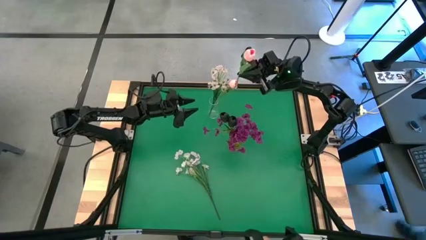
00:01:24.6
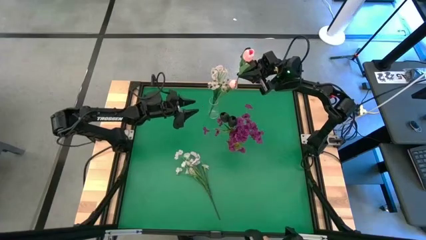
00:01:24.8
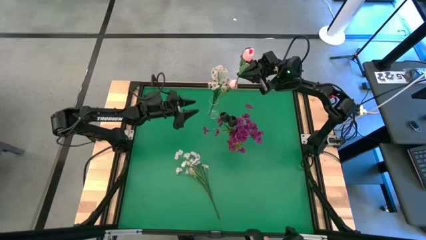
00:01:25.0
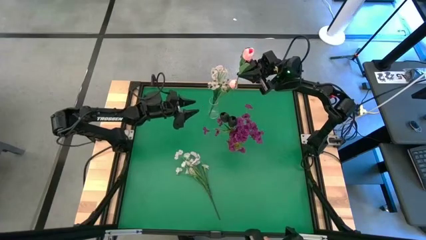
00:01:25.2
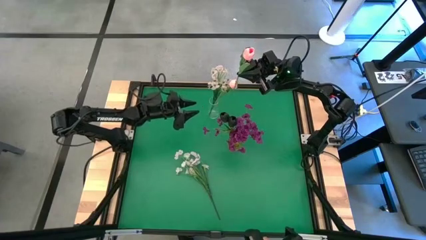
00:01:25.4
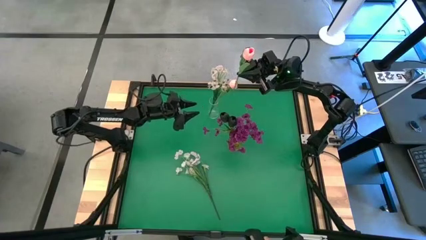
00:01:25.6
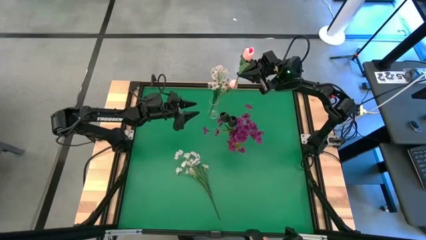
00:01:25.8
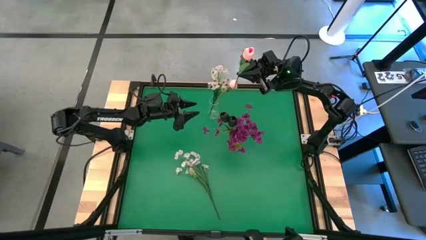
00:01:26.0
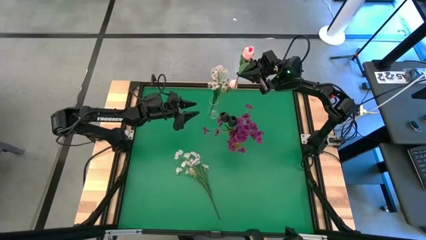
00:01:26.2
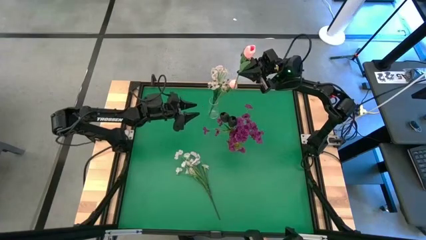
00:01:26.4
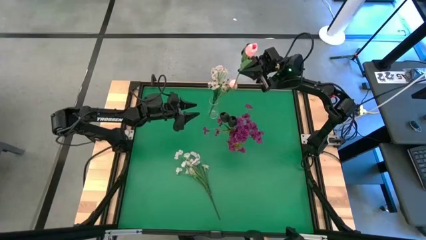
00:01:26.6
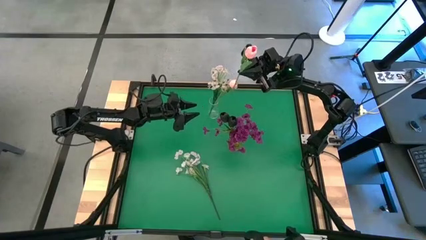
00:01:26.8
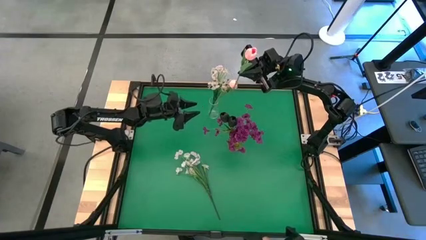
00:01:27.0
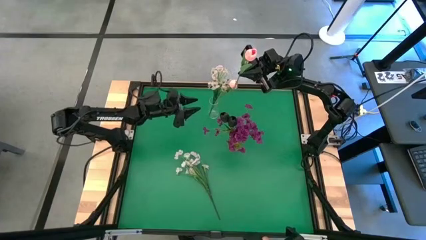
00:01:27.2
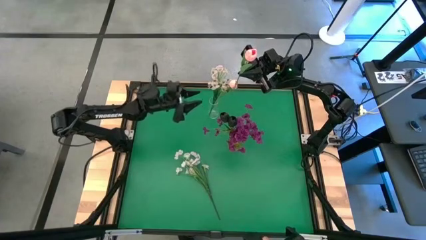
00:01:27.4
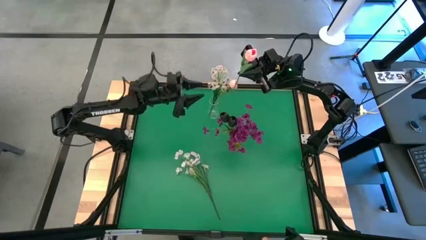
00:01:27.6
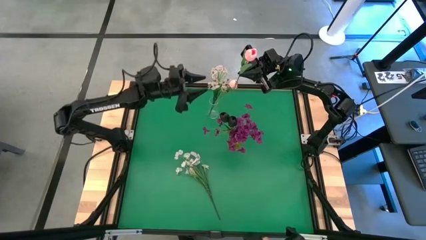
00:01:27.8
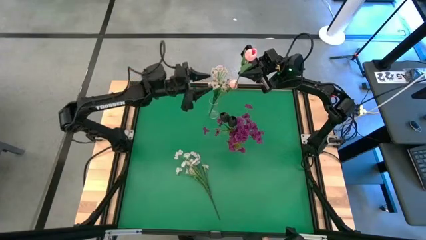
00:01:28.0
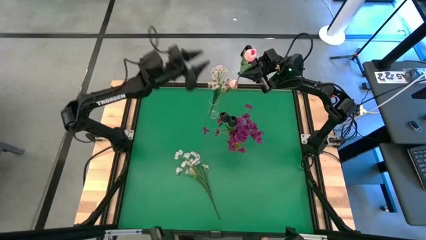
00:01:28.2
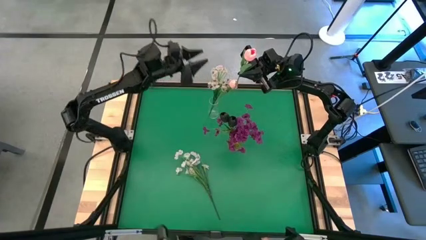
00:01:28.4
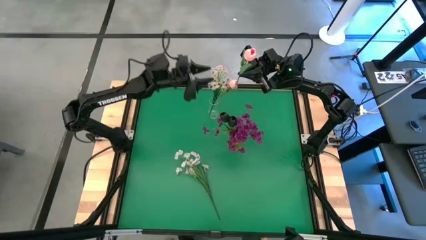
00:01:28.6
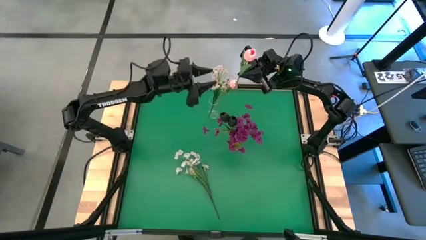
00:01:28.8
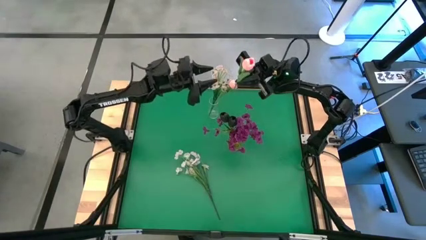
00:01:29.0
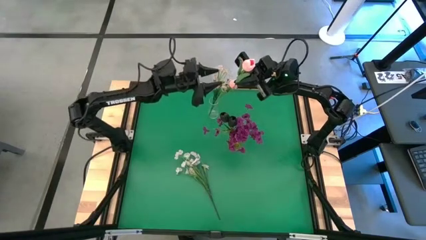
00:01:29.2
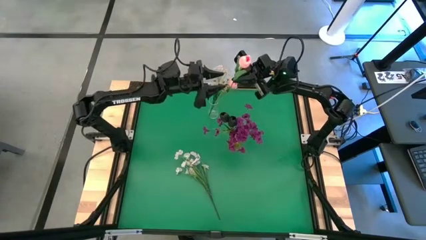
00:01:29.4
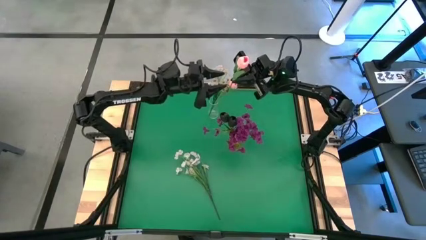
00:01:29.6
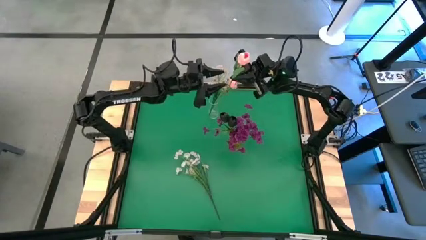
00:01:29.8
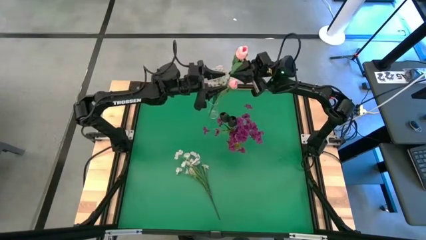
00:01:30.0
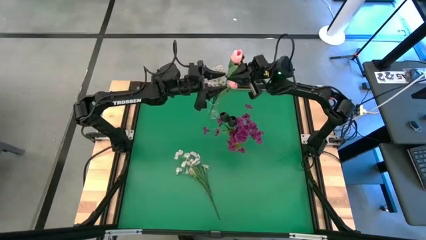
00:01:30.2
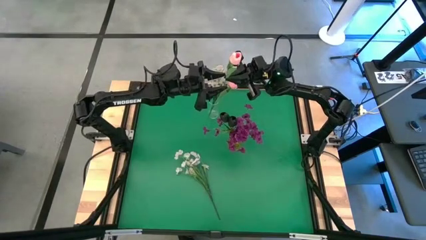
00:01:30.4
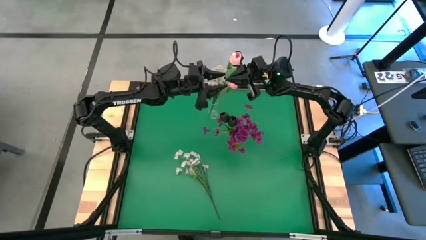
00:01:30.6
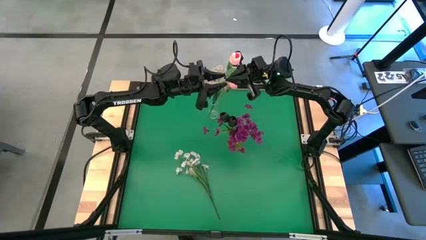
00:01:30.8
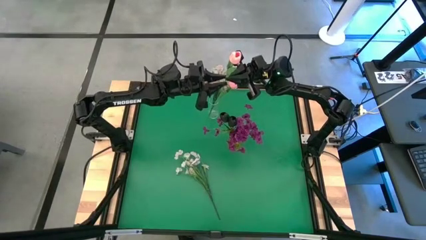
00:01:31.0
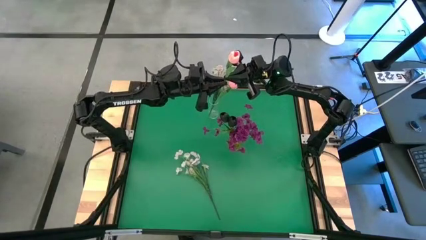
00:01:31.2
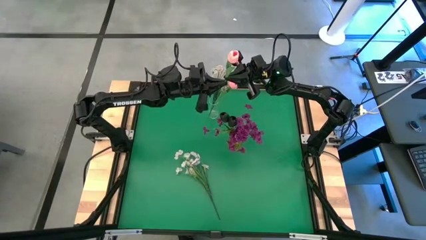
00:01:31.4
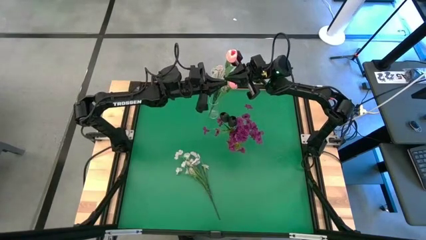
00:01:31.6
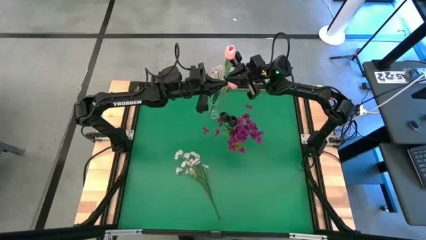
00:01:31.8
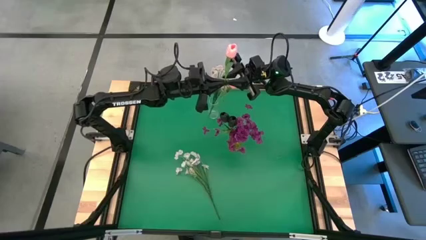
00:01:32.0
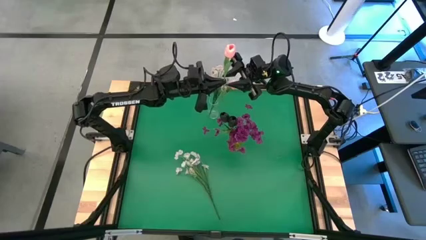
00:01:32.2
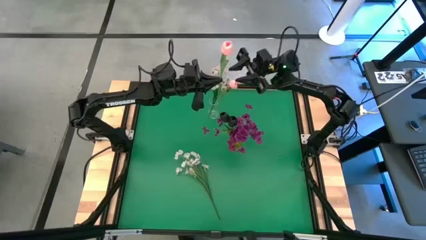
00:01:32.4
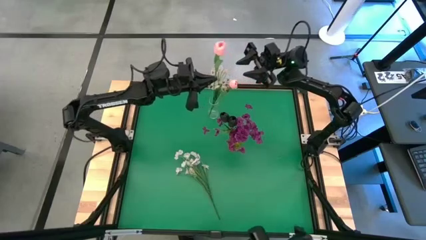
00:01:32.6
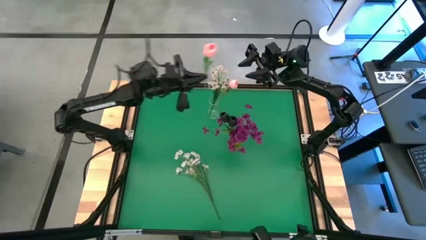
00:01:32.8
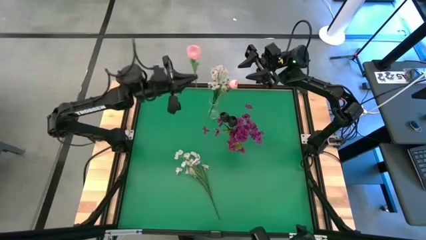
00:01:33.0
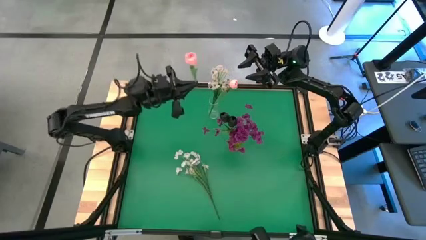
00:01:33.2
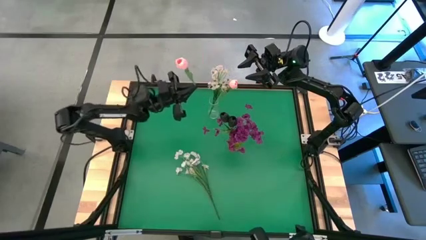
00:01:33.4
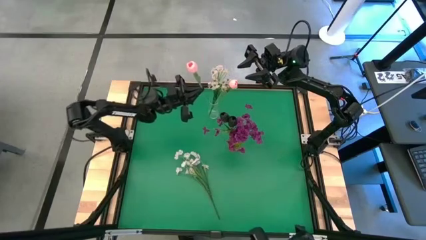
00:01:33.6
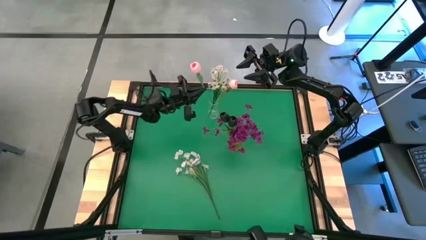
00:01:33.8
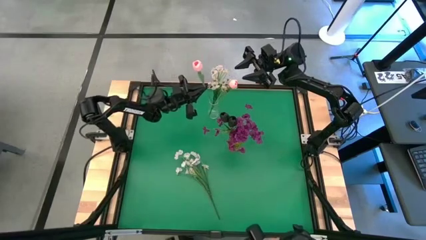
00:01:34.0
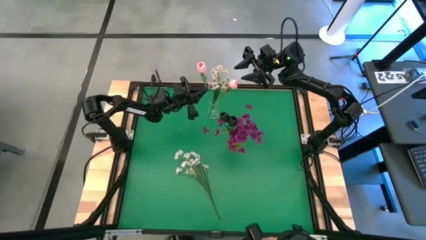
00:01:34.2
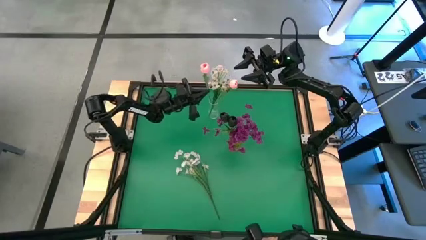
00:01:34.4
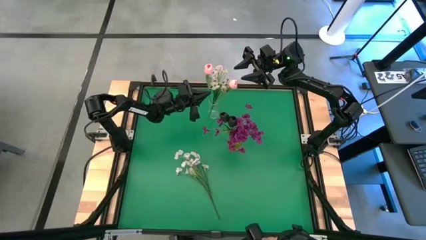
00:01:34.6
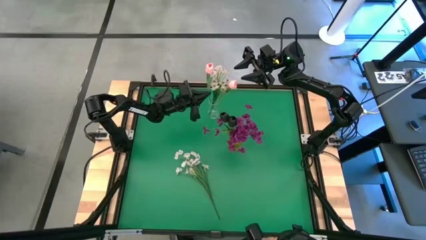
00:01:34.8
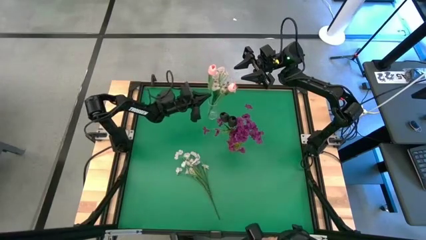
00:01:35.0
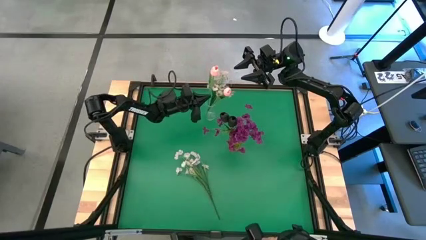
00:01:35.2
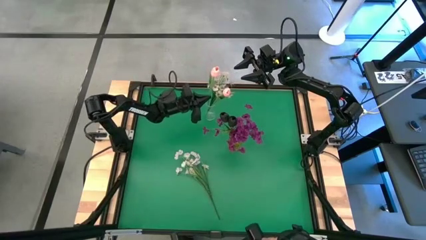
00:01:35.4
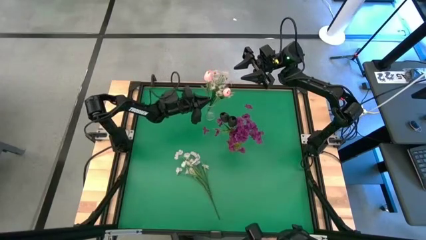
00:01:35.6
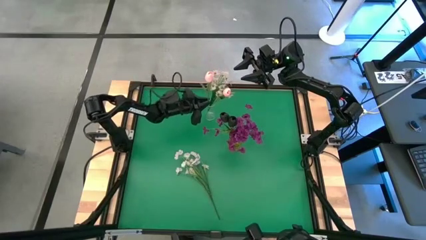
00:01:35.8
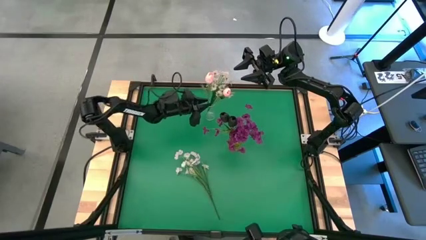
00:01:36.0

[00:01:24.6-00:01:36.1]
Task: Sort flowers into vase by color
Put the pink flower into the transparent vase

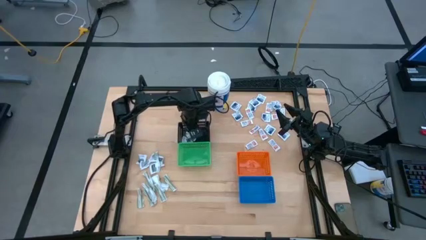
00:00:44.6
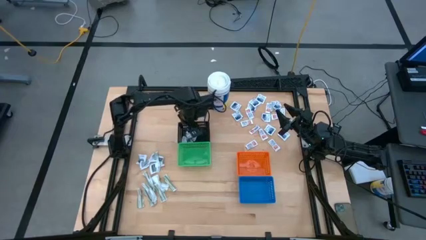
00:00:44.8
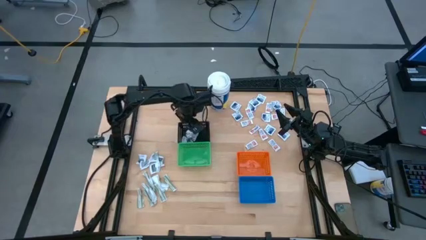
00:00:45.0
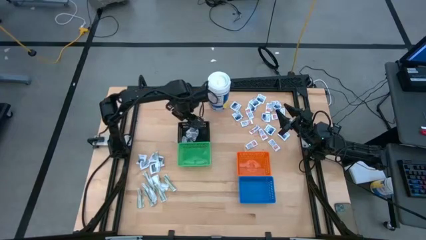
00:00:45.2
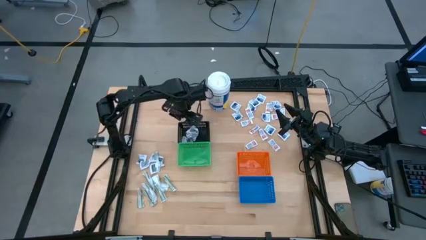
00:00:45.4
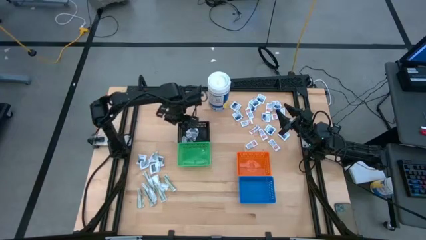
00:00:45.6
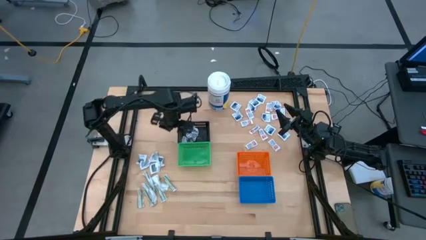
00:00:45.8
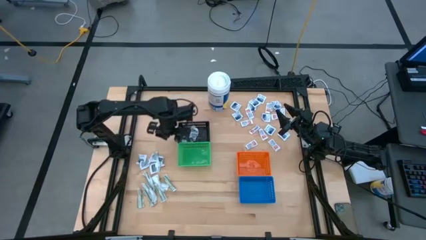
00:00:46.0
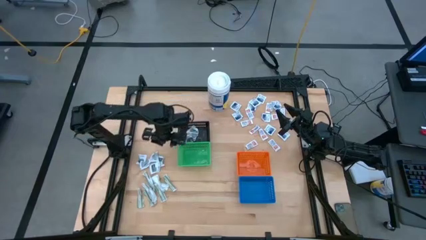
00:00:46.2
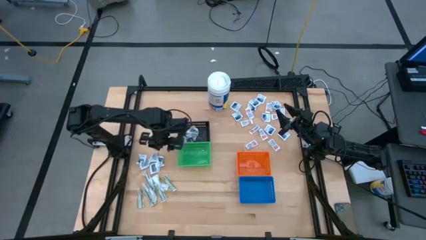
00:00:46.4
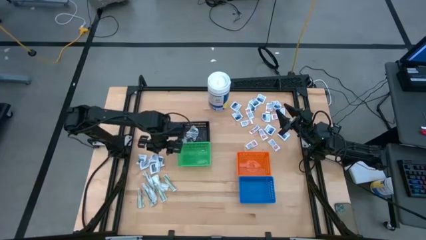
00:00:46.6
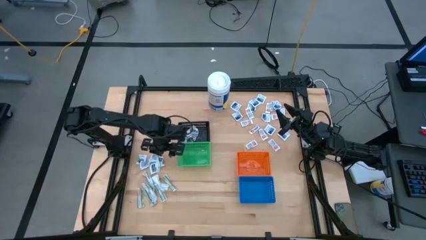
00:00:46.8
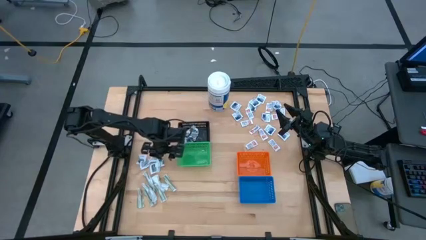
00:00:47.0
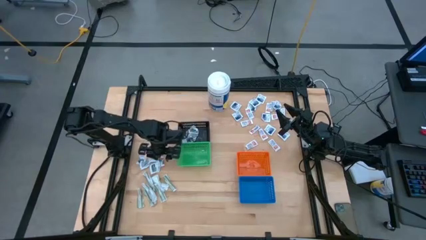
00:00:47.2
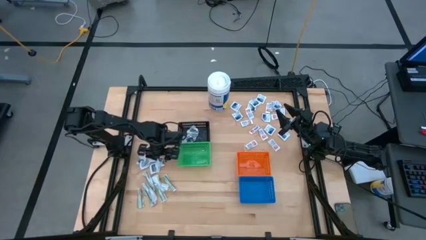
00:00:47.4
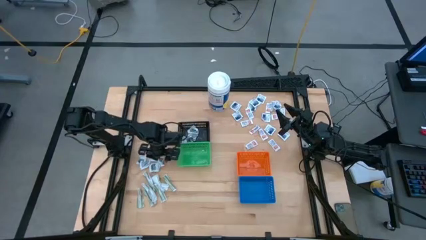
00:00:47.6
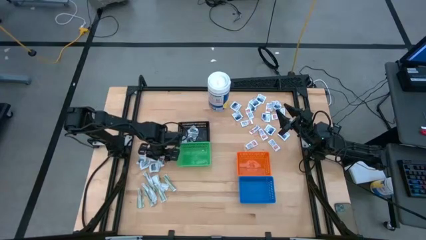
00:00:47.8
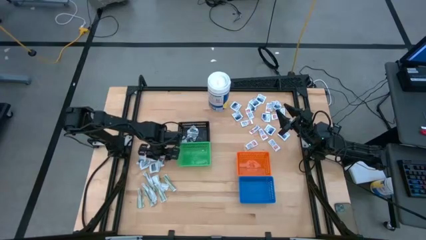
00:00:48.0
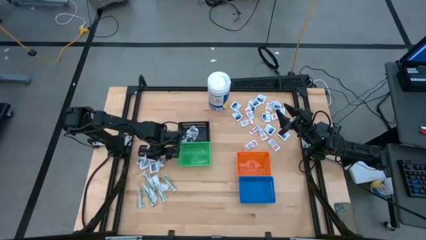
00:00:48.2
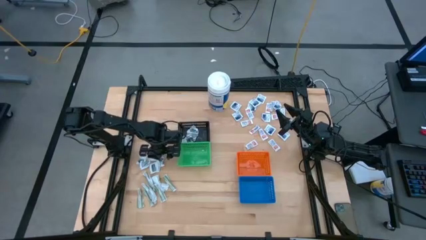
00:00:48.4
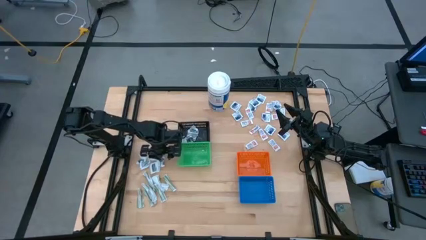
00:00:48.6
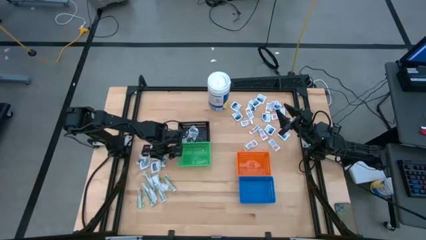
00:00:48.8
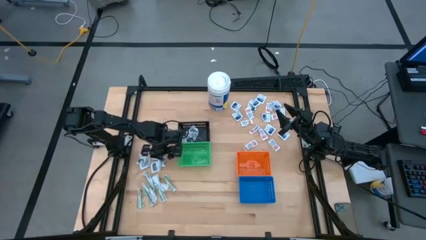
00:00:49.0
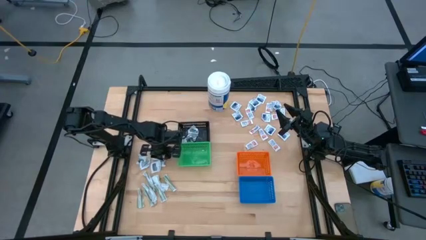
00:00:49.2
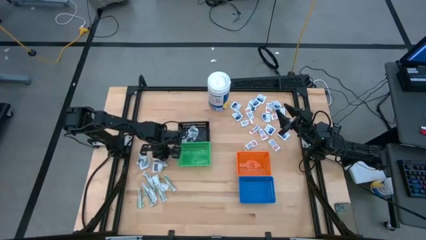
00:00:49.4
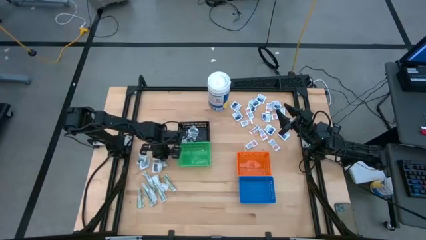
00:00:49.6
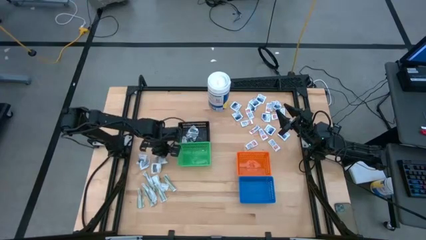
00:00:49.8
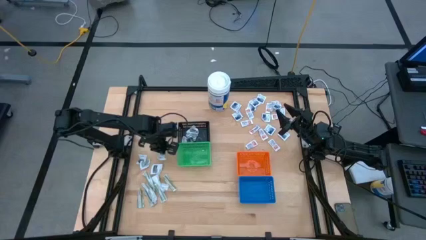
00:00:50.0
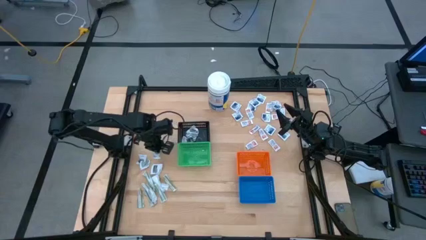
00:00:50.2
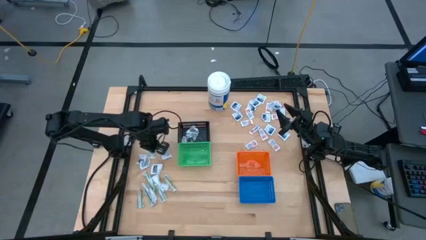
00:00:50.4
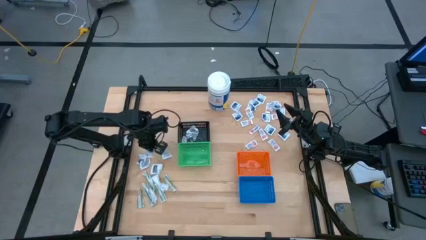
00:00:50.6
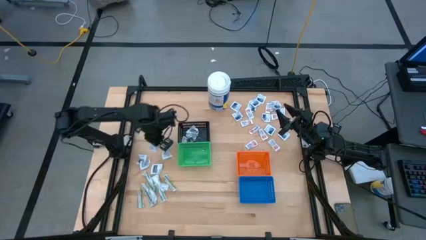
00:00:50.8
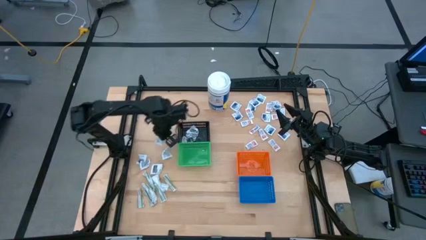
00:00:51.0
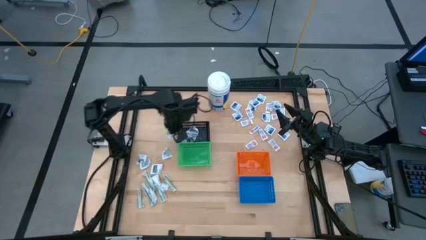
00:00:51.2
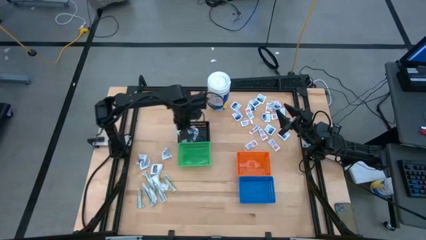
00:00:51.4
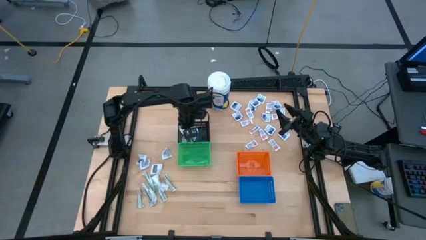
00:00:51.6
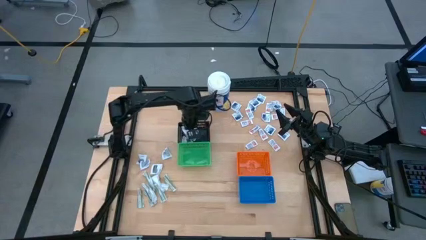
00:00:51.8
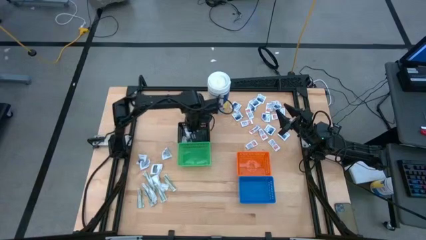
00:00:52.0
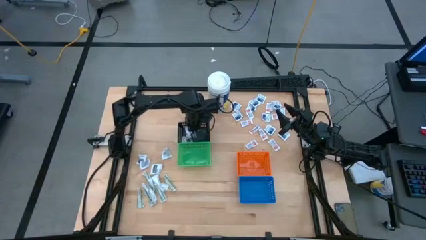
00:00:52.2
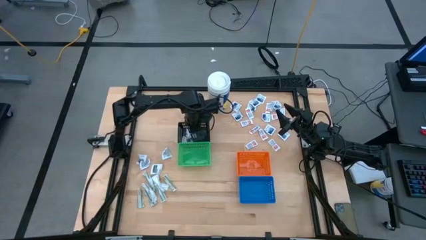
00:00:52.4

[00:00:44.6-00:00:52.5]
Task: Pick & Place First Aid Supplies
Put the black pad into the black bin
